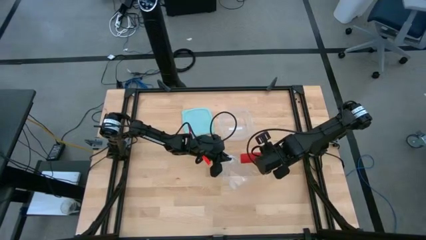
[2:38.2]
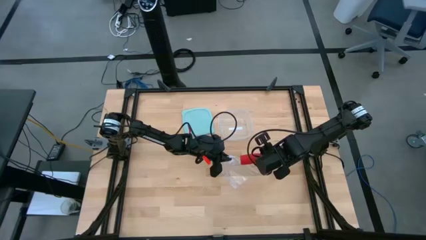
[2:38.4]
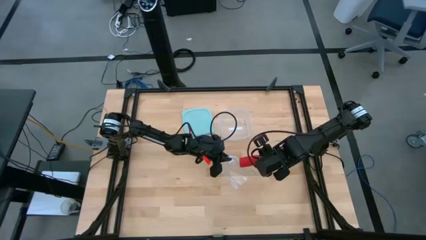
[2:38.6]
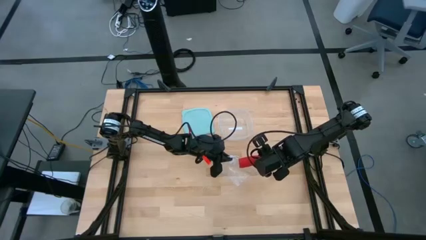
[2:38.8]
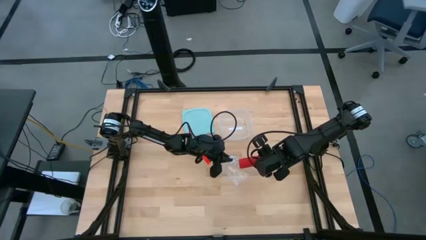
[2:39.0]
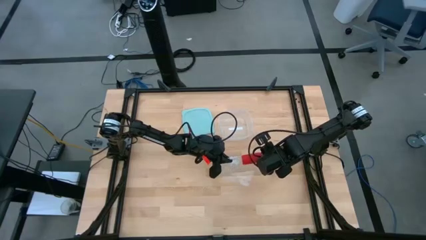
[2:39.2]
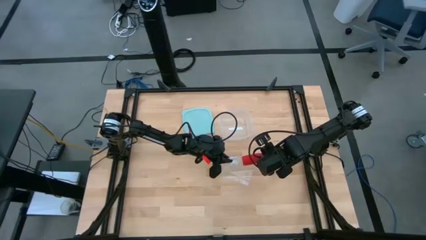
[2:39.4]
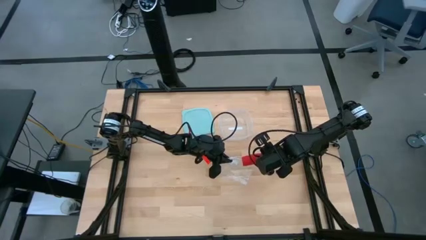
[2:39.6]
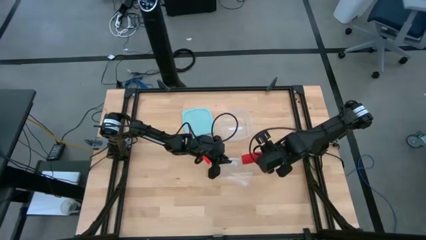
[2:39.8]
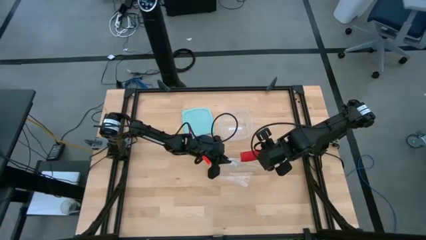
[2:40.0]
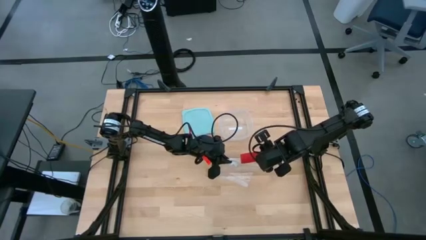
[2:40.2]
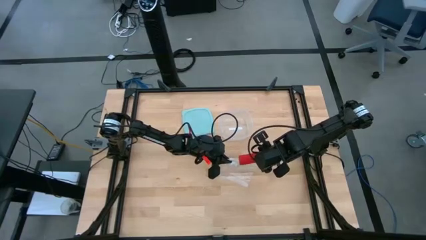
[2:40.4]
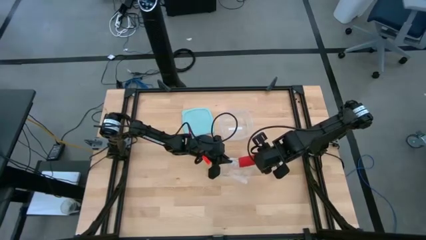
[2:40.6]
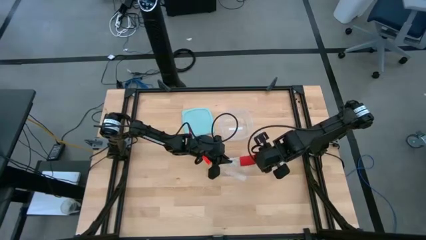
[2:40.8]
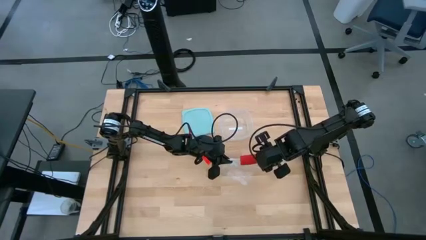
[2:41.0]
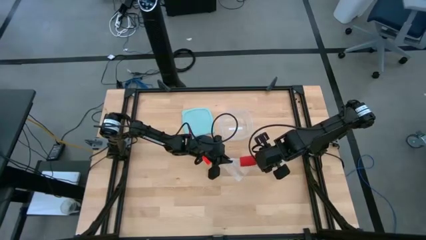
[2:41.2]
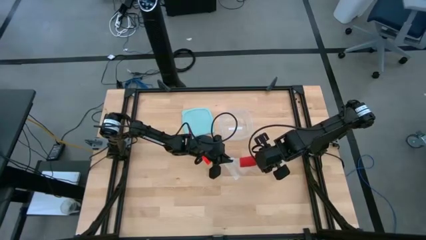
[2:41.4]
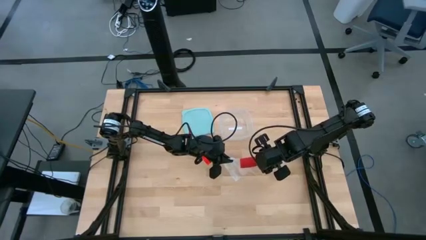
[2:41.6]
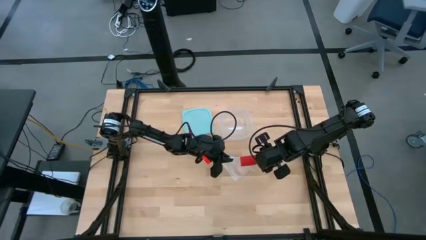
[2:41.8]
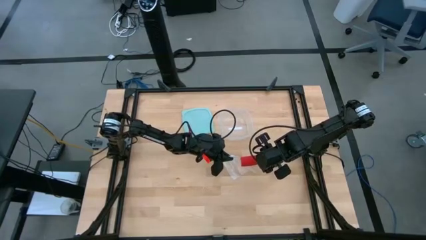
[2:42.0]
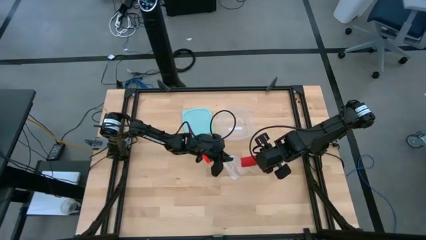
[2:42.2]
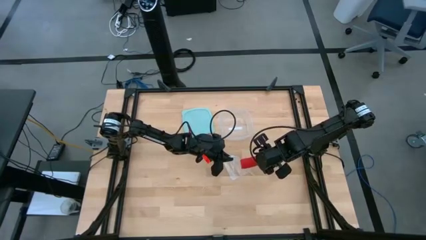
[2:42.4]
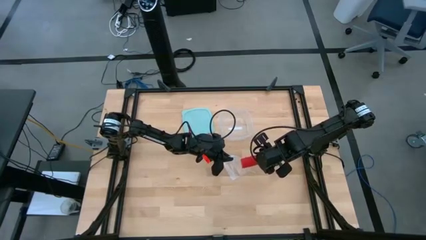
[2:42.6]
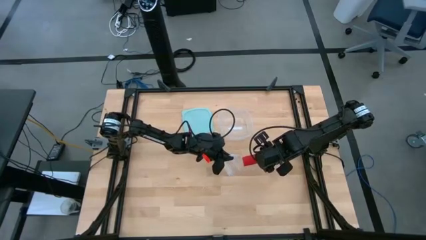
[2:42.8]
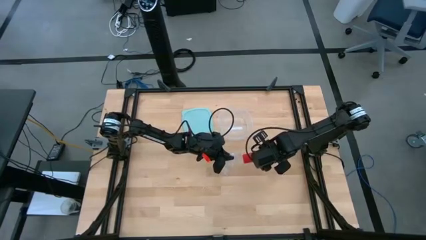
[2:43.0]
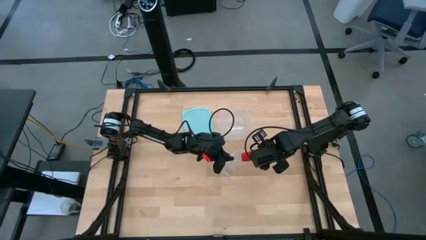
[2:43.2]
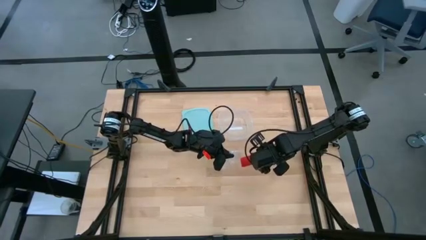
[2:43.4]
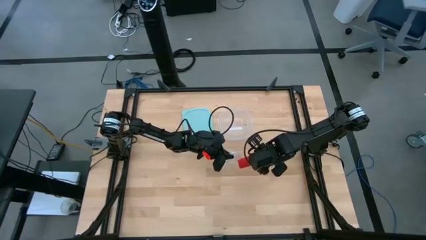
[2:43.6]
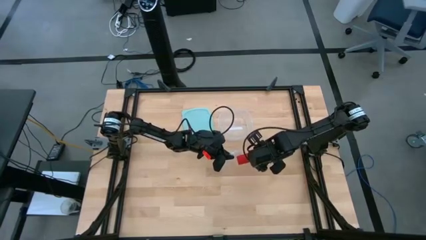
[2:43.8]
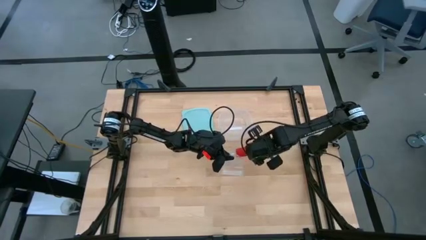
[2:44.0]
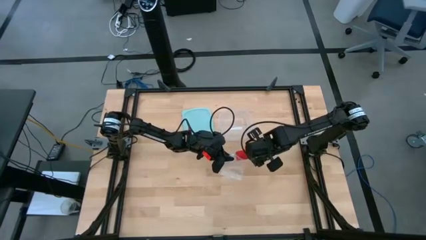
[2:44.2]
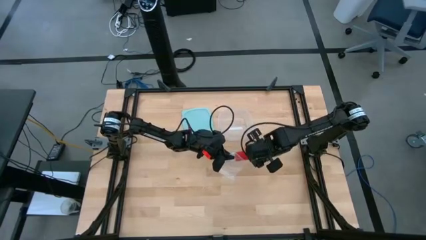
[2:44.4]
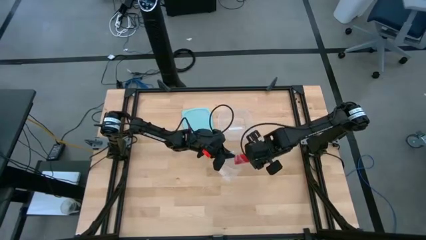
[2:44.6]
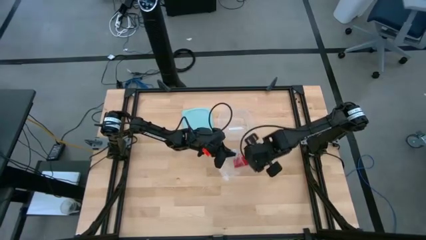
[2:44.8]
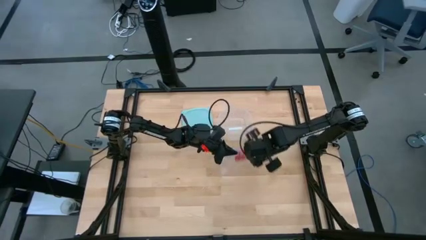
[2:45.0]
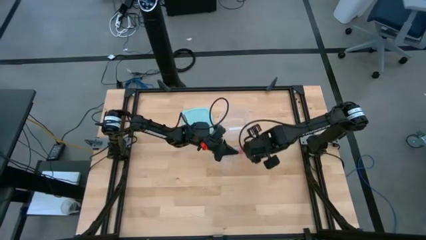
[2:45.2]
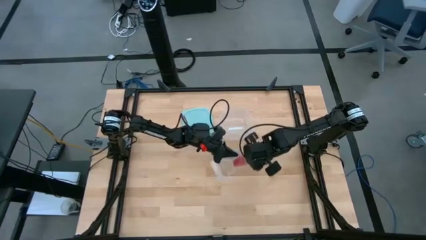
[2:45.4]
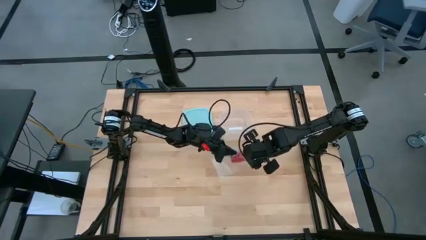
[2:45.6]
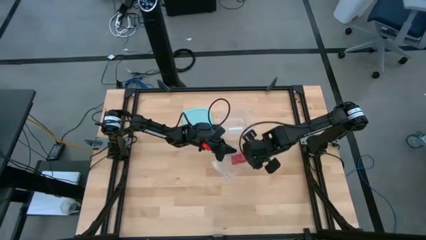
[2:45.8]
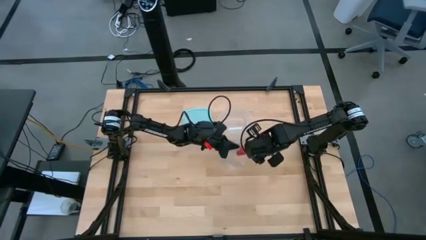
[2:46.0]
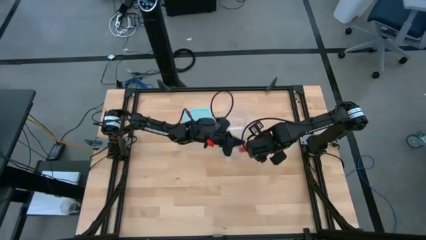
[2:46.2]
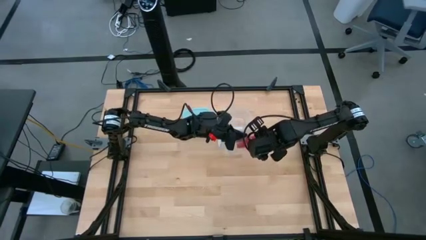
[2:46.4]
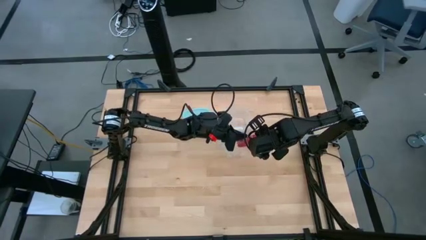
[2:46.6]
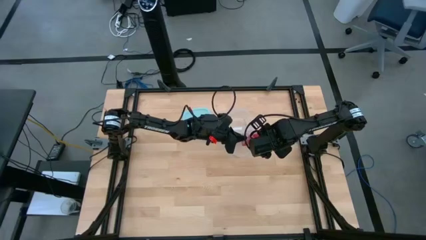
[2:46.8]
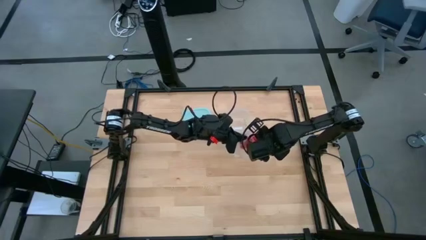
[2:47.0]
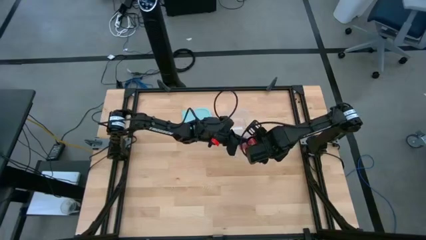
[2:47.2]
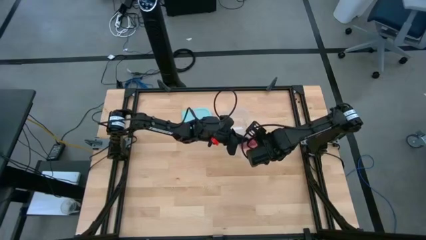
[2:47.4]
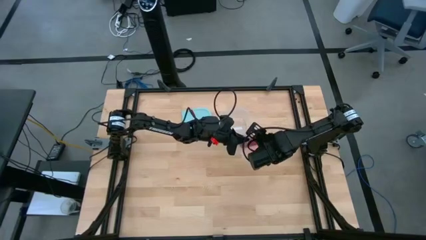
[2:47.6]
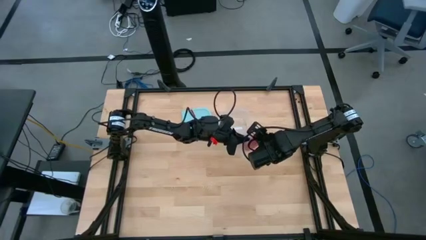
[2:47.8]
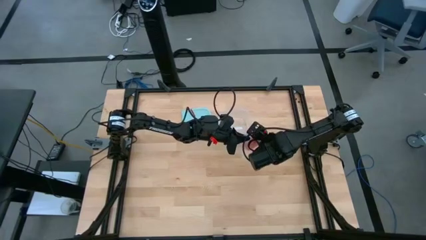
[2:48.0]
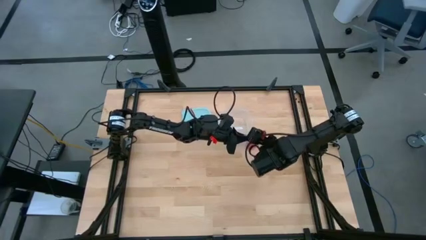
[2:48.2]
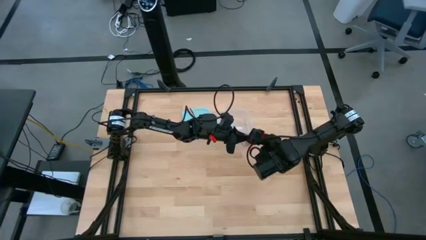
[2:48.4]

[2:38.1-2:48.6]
Task: Roll bandage
Put the red rolled bandage into the transparent zip lock bag

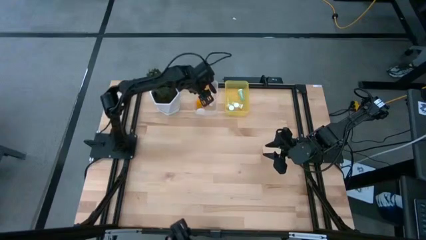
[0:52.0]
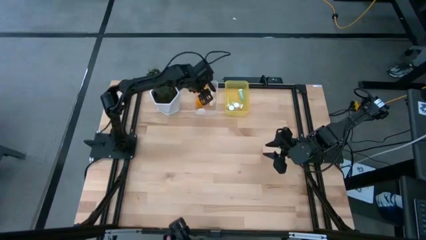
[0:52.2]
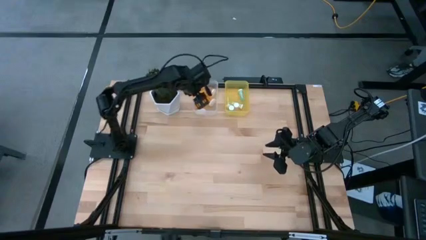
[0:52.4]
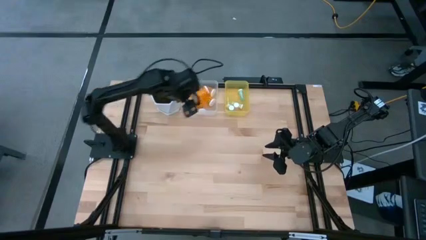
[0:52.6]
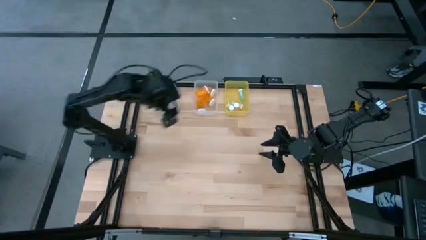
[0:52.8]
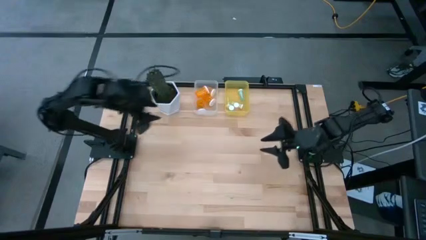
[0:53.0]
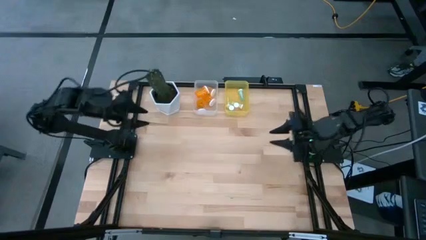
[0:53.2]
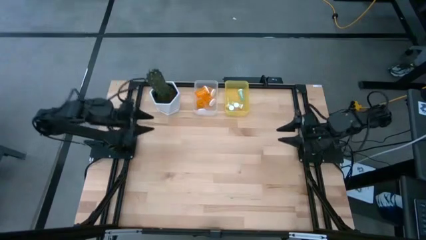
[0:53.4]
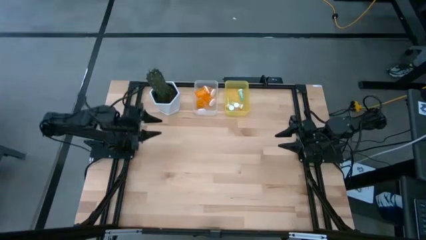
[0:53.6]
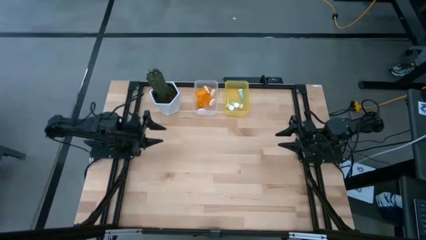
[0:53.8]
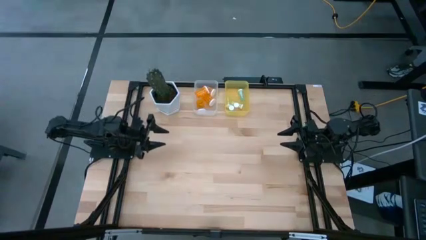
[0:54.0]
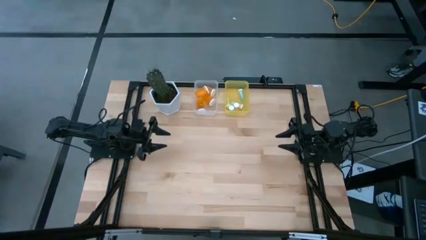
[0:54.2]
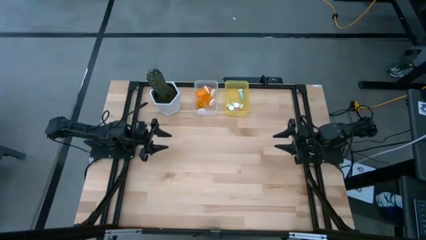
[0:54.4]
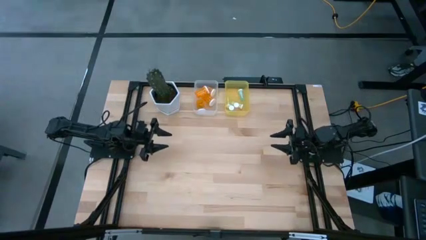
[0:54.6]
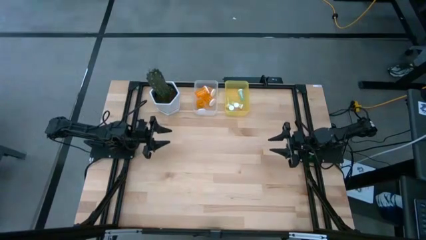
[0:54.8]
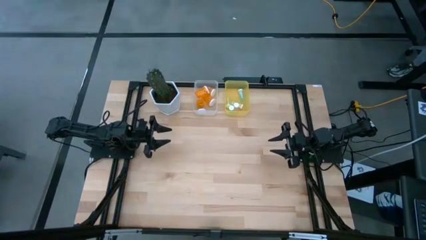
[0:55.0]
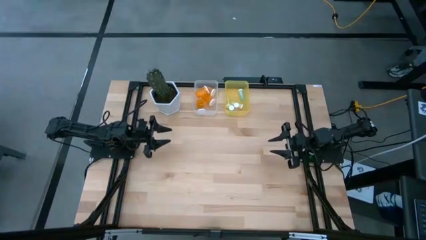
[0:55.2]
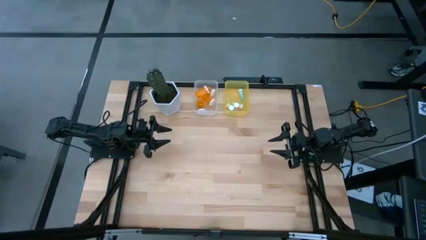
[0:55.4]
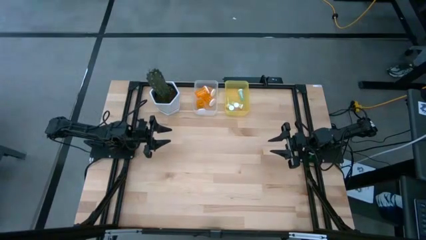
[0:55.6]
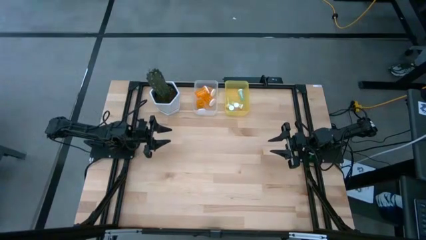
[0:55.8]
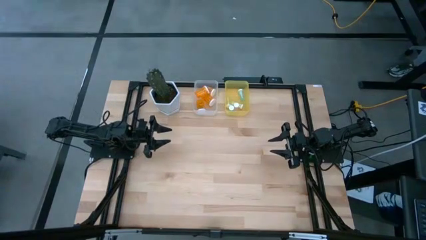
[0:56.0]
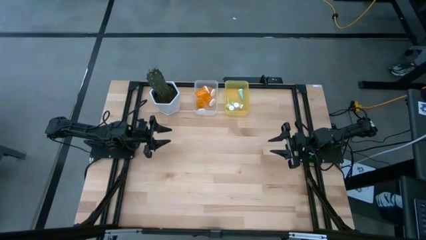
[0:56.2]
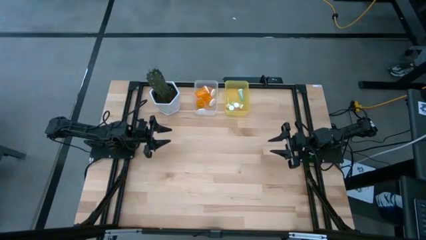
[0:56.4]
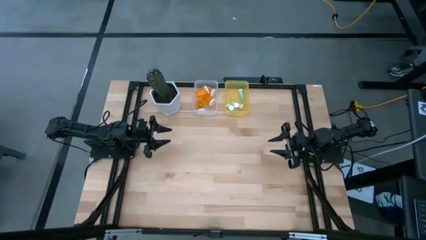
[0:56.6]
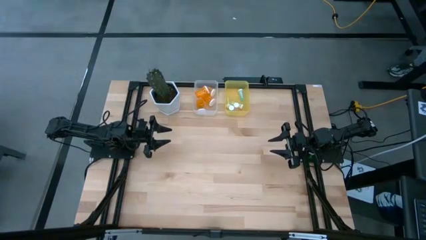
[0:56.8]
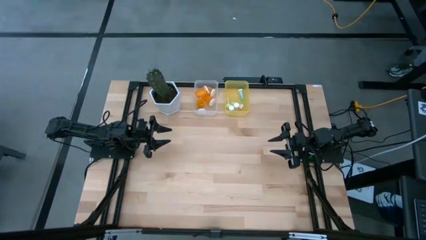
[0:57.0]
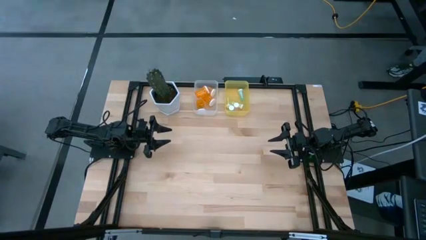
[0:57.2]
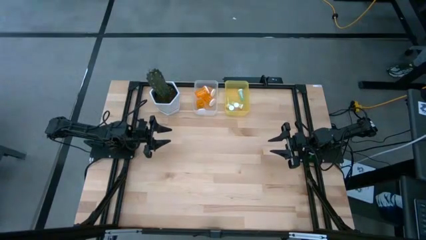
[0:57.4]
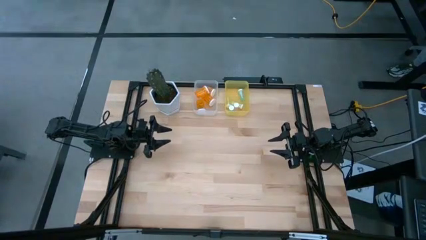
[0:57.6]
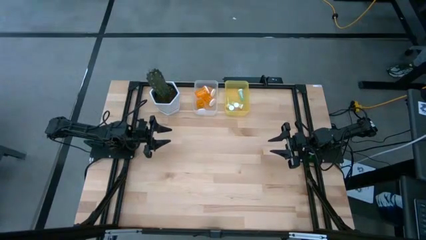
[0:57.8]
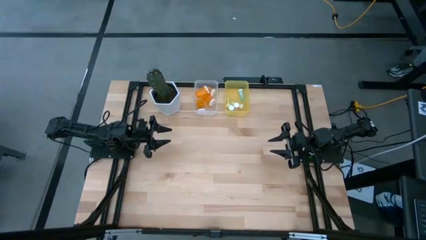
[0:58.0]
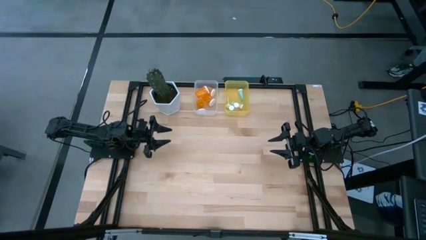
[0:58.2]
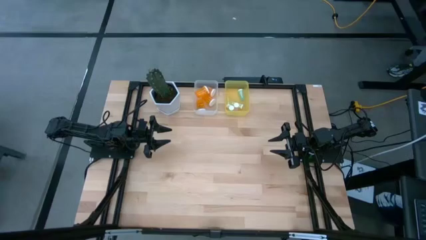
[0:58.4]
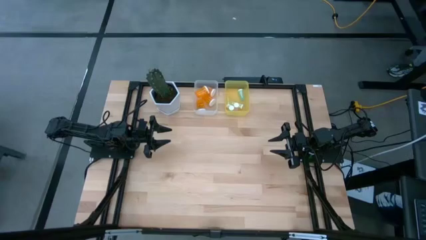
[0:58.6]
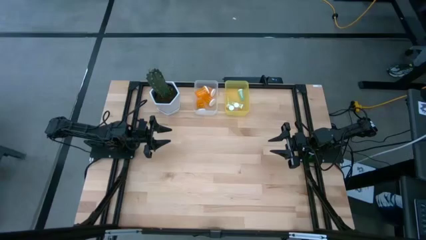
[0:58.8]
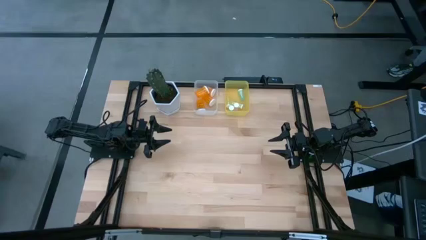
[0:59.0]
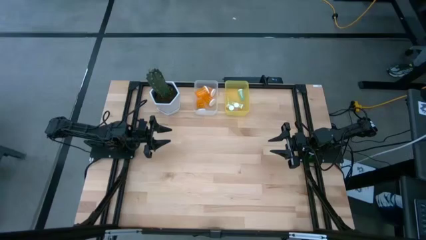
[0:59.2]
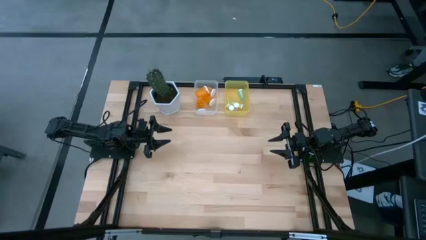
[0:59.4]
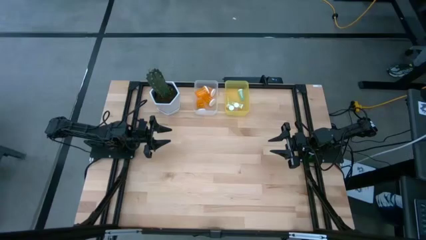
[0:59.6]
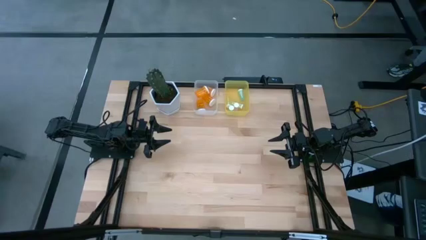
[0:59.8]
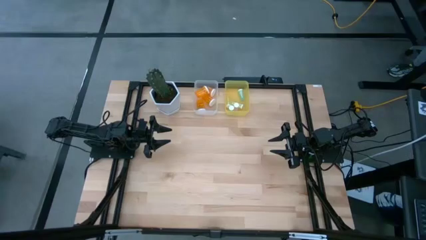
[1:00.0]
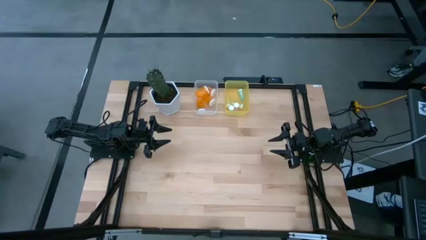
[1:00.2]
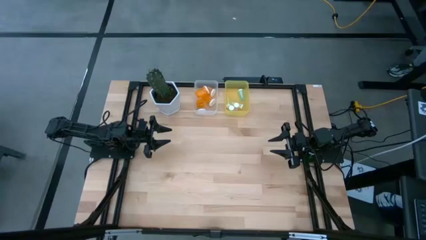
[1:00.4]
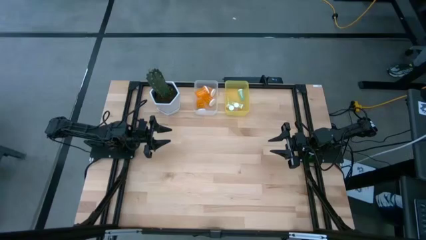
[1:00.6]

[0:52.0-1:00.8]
Task: Pick and place medicine bottles into bin by pill shape (circle, oval)
Return to Home Position
